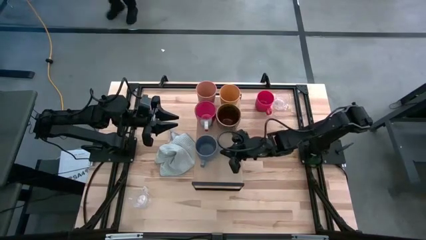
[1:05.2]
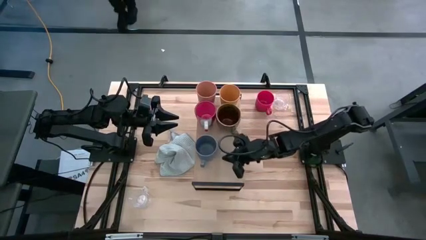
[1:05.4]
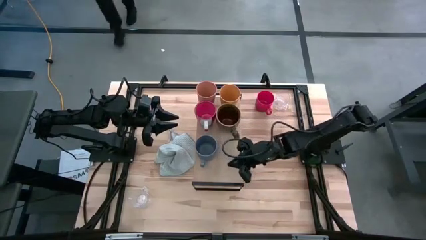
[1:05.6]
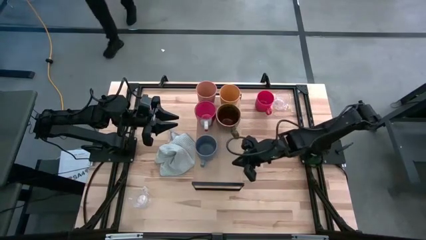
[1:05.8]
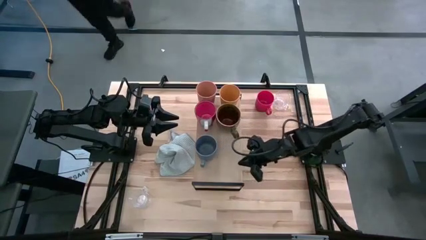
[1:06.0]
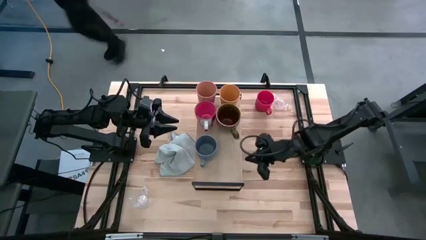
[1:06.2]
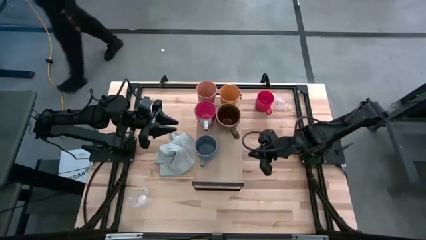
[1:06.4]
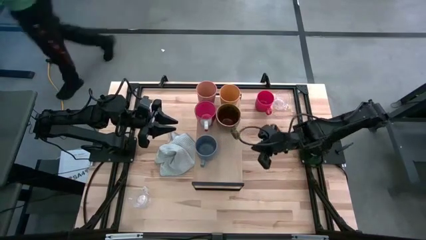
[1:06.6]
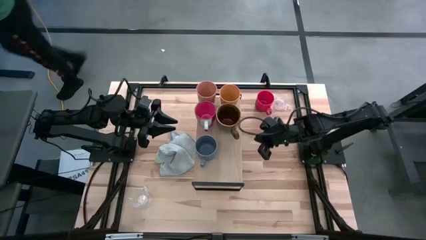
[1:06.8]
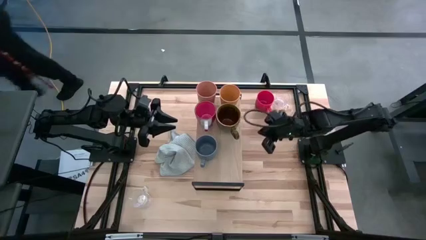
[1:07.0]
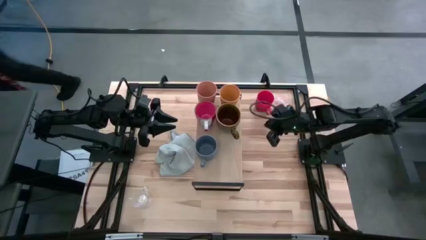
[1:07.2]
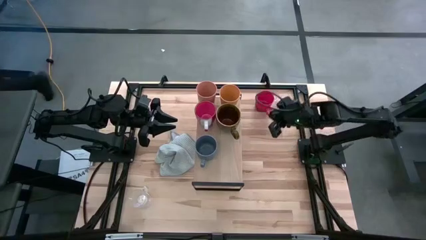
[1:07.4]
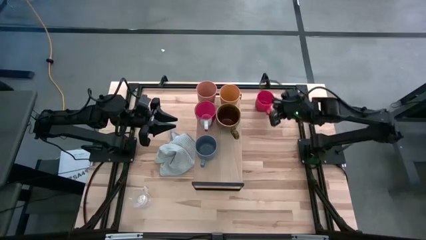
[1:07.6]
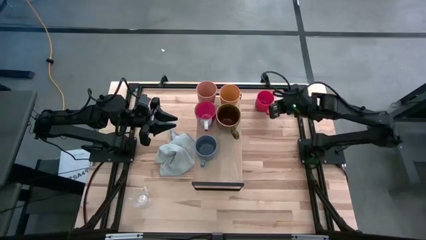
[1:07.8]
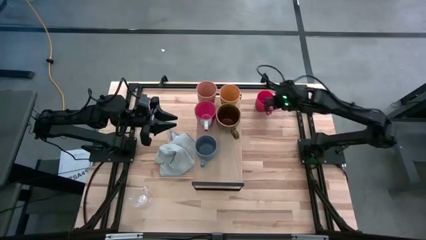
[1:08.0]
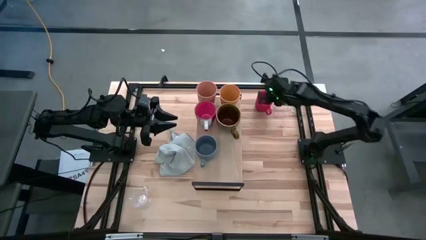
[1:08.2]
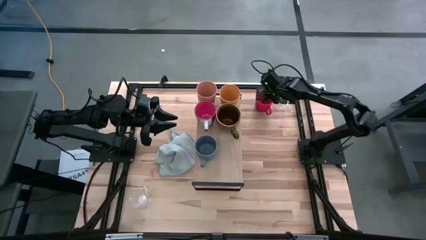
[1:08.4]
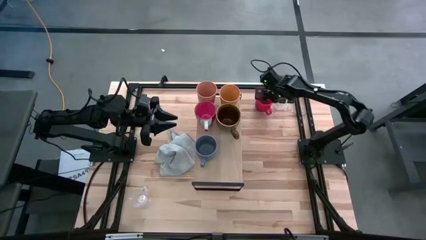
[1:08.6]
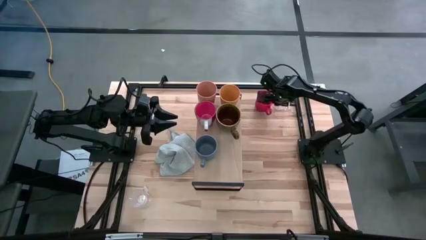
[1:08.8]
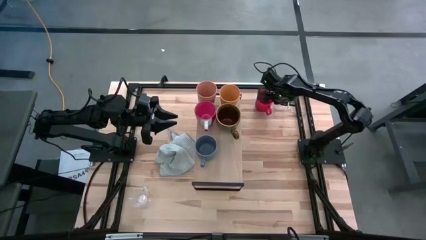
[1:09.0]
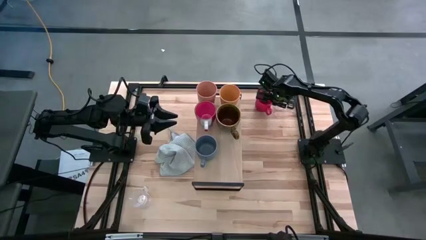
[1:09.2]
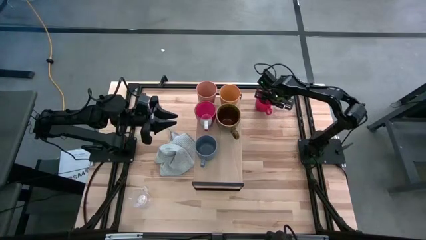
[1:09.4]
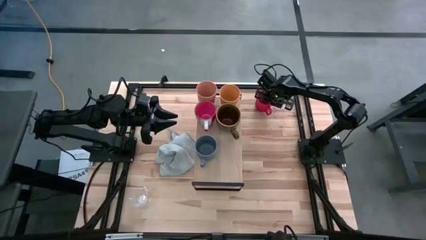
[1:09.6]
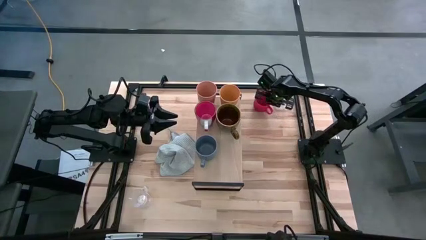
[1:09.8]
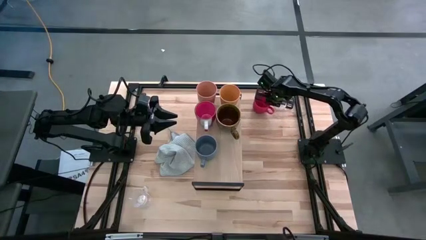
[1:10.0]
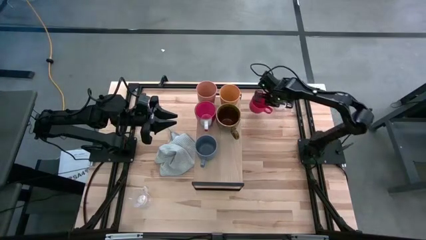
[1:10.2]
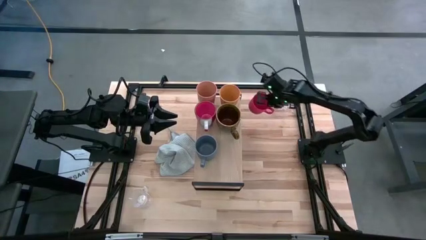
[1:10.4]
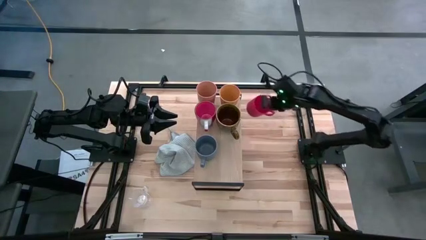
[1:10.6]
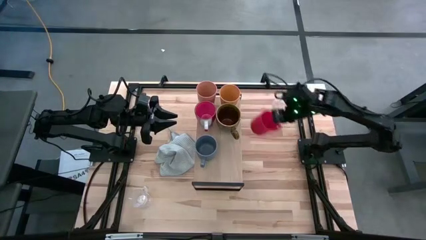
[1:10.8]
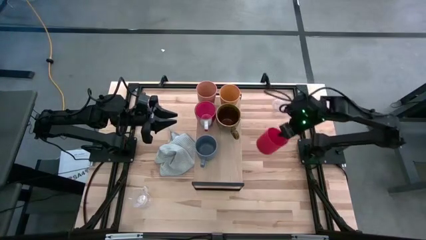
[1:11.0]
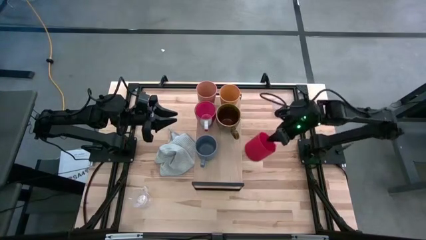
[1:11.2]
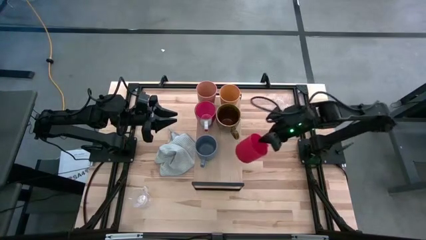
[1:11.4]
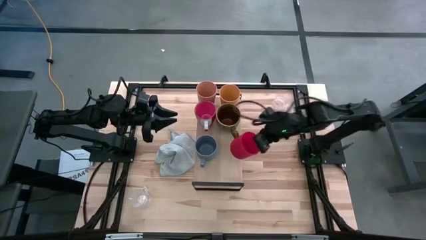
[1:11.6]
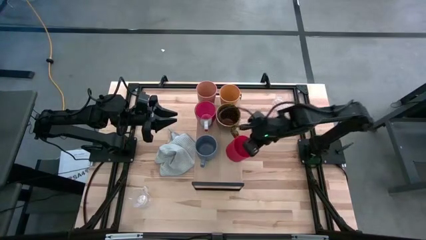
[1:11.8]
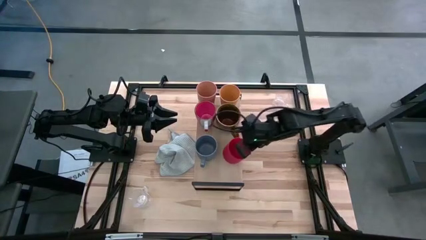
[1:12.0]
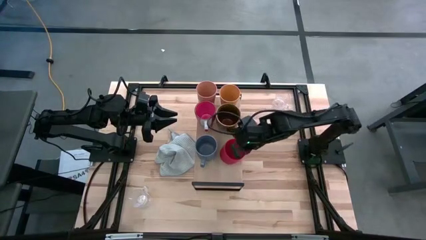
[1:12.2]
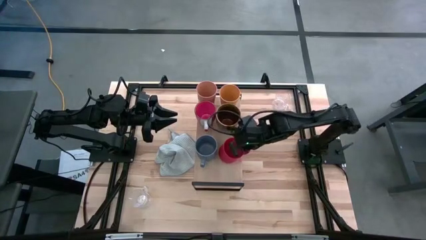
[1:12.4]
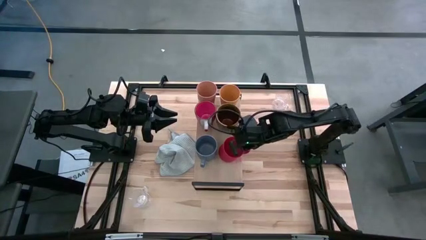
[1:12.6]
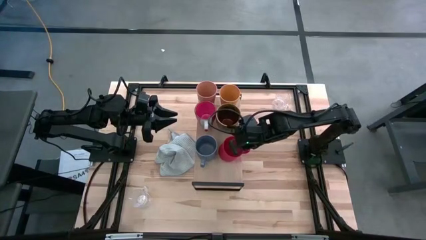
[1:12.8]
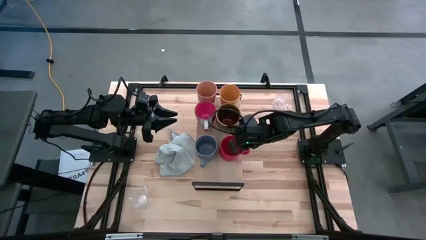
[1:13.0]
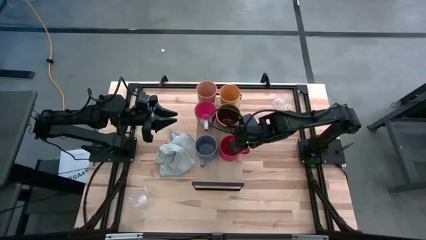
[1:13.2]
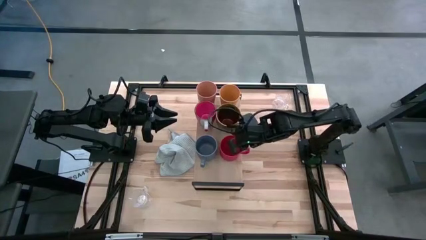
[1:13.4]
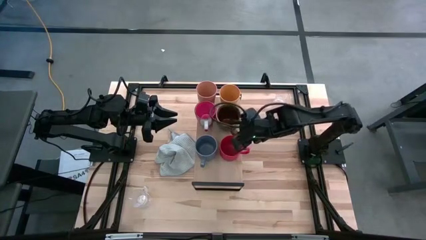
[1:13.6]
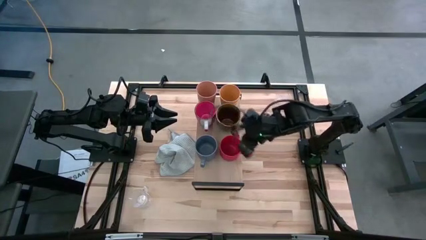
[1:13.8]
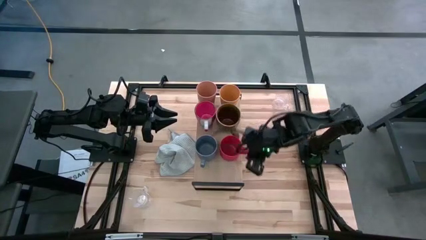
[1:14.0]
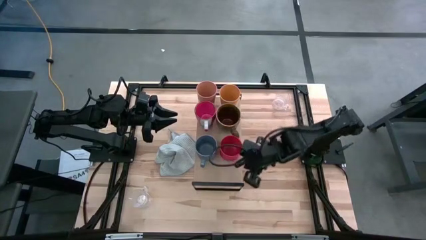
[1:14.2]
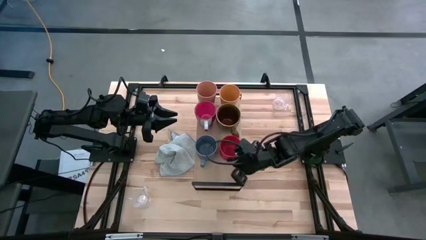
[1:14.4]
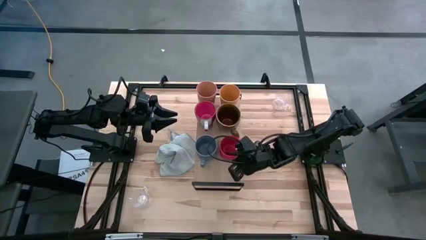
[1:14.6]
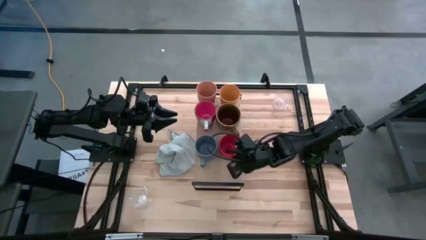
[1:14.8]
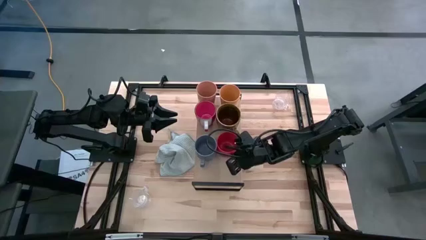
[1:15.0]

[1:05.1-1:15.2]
Task: Stack small to large cups/mugs on shelf
Put the red mug on the shelf

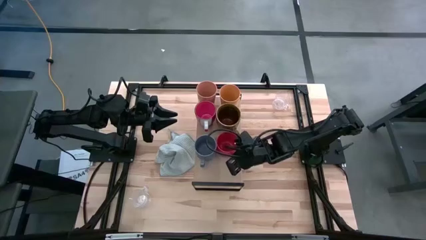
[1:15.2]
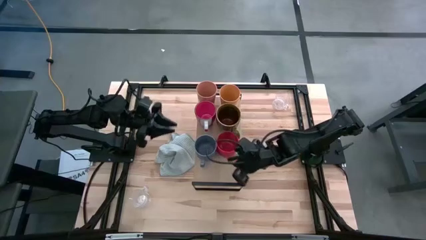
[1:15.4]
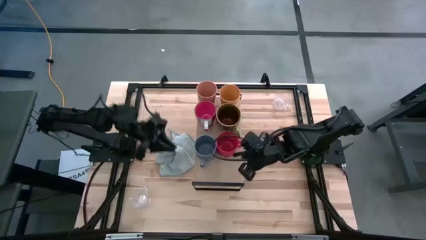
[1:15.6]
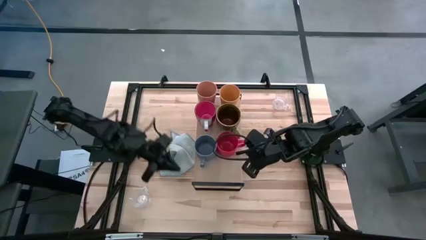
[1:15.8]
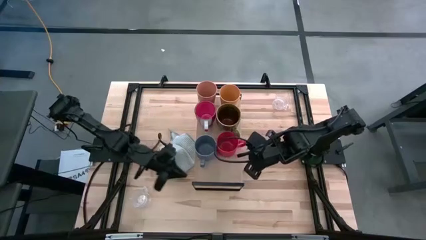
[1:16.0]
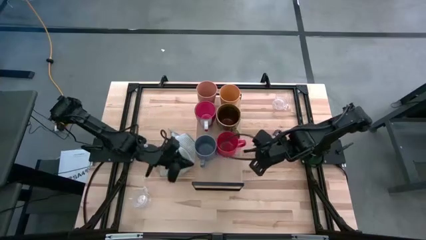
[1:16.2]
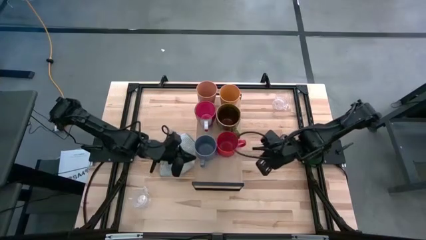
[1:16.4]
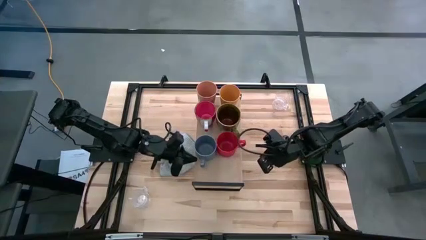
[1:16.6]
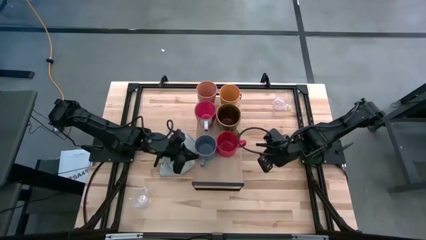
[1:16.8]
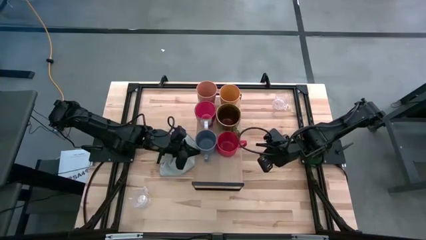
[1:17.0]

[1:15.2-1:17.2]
Adjust the blue mug

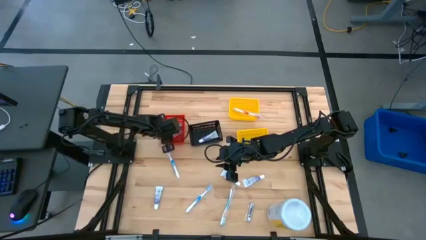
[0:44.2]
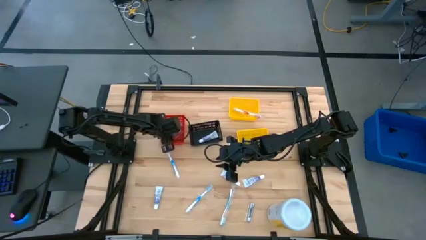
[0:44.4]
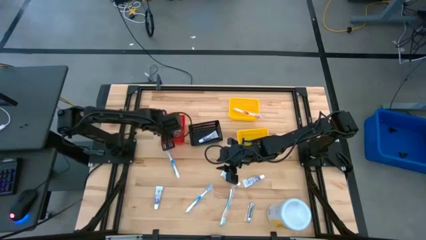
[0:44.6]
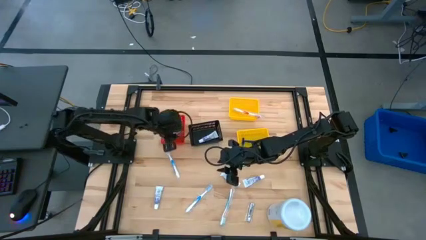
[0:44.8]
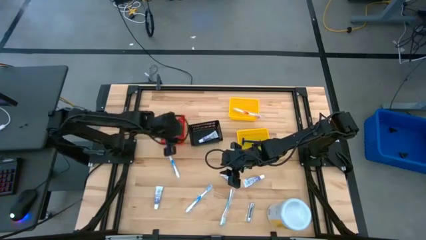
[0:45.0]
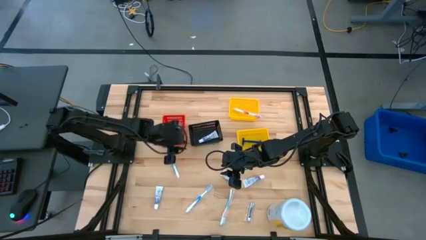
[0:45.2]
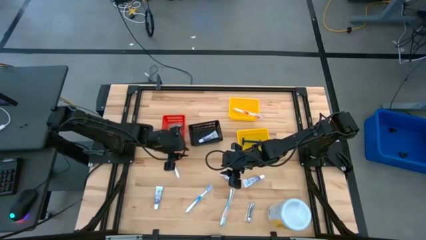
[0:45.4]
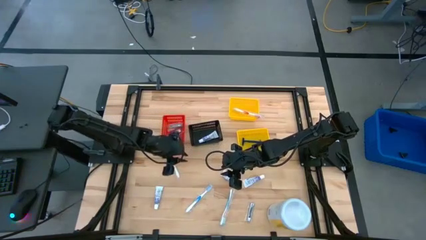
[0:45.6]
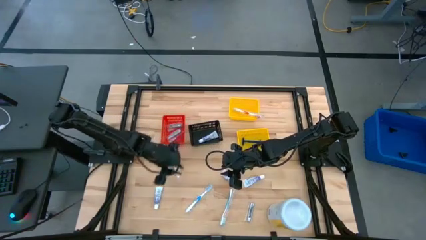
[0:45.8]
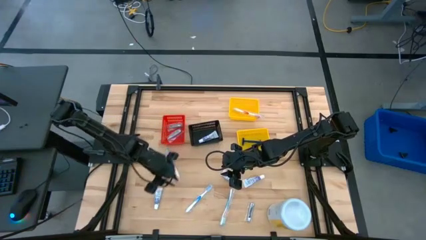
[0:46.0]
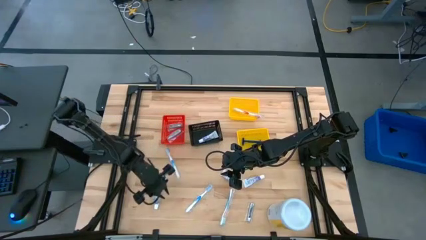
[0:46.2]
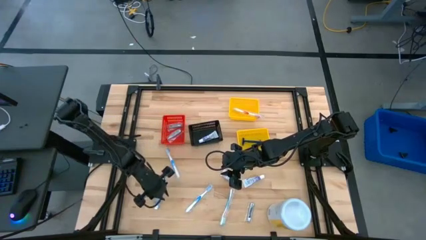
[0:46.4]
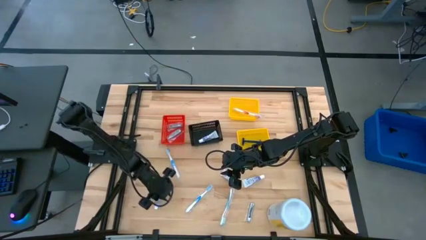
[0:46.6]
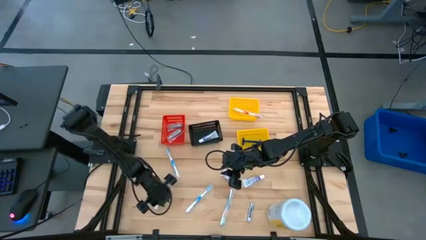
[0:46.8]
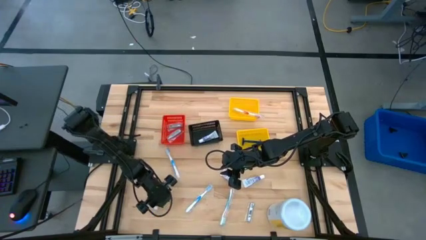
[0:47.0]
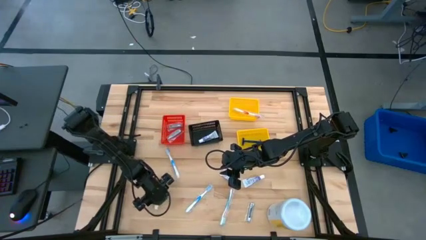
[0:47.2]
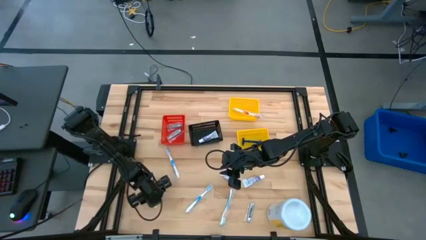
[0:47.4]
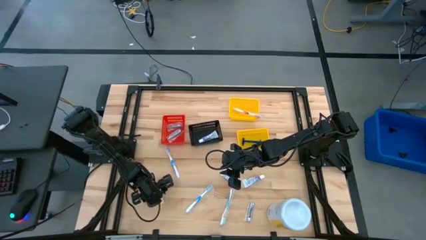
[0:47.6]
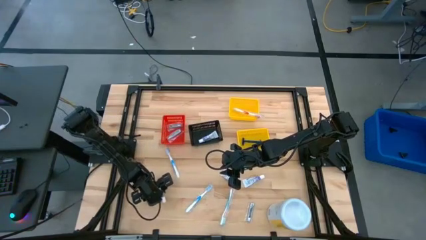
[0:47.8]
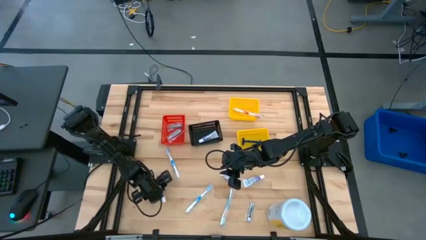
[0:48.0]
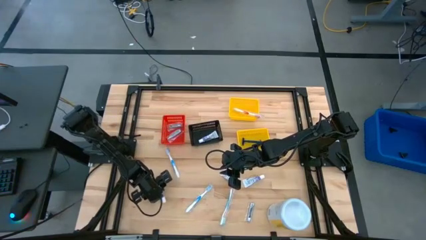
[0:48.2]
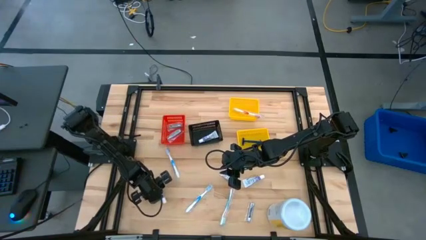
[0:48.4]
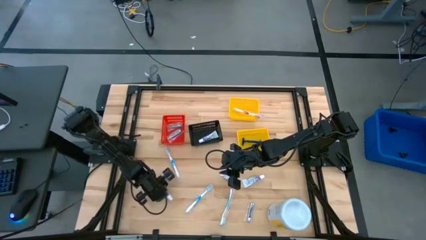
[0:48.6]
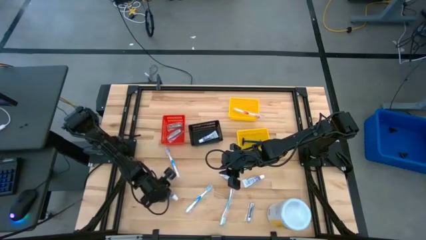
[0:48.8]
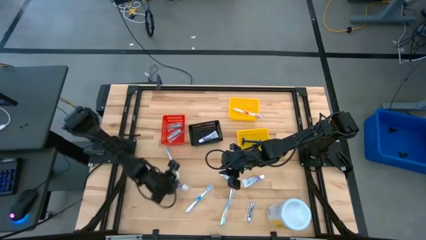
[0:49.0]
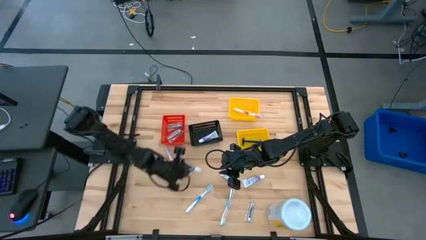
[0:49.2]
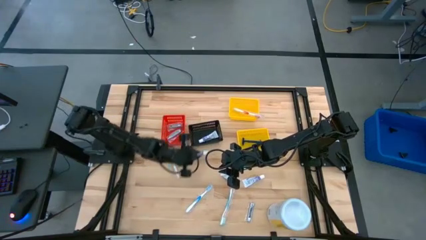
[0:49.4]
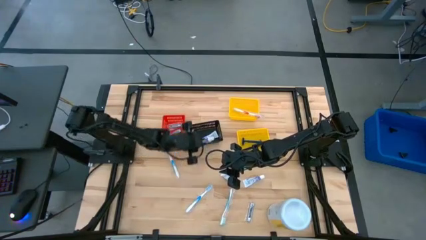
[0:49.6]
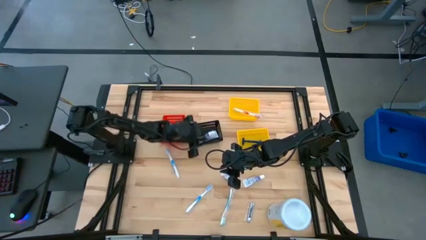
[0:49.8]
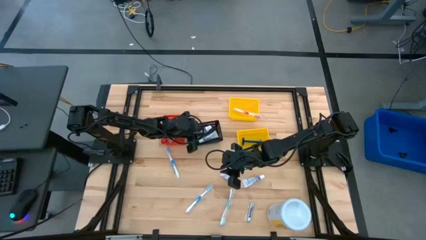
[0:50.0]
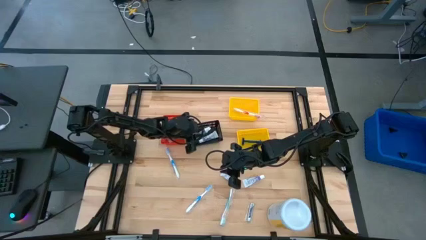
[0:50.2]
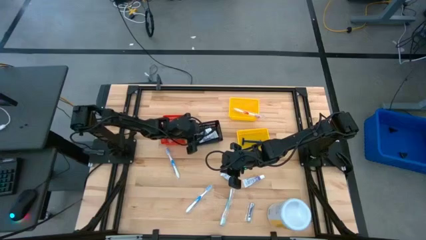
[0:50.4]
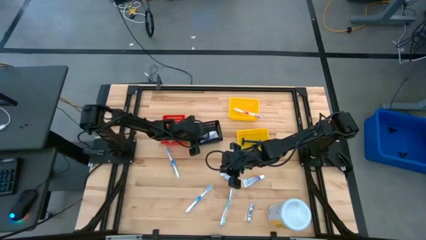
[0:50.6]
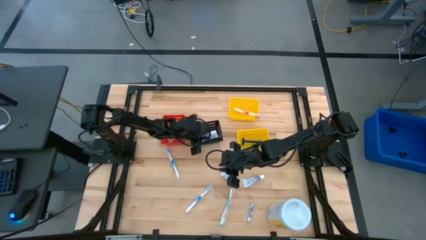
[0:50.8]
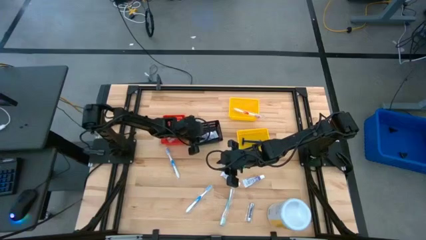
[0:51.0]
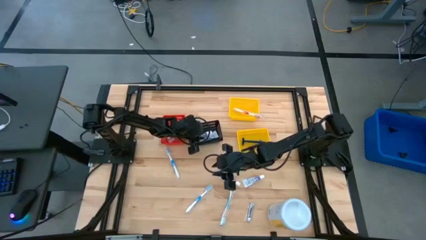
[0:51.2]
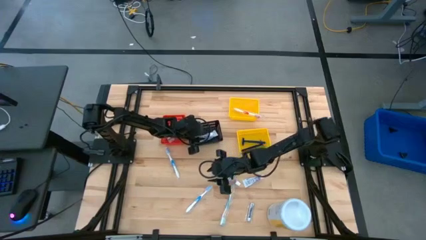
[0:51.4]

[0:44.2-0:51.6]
Task: Pick & Place Travel size toiletries
Put the white toothpaste into the black bin
